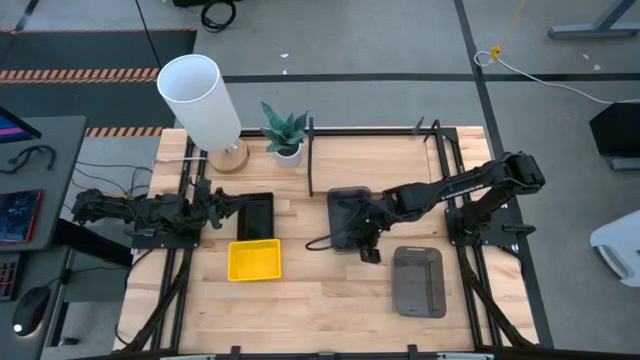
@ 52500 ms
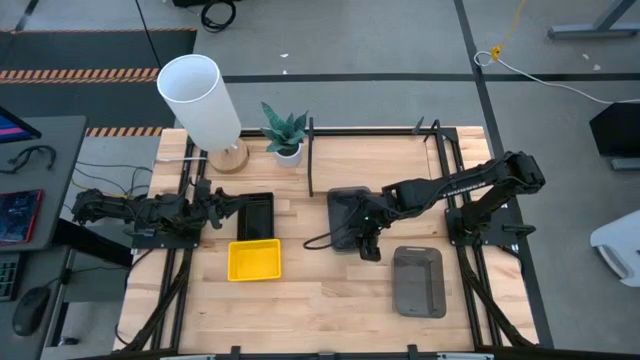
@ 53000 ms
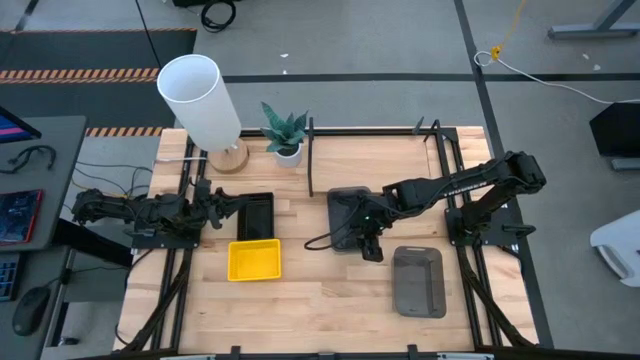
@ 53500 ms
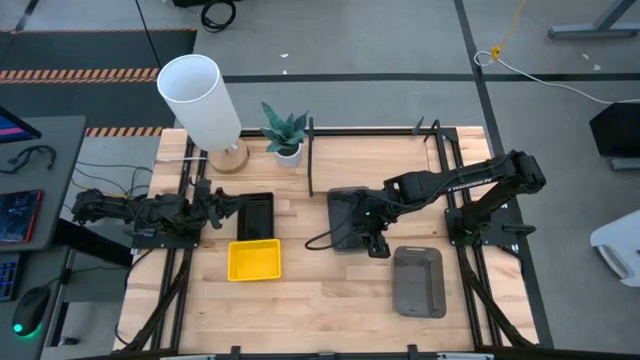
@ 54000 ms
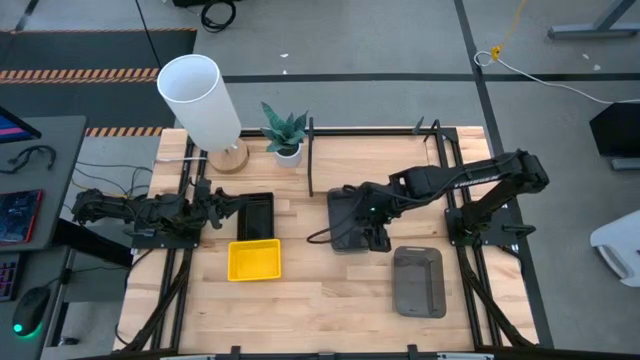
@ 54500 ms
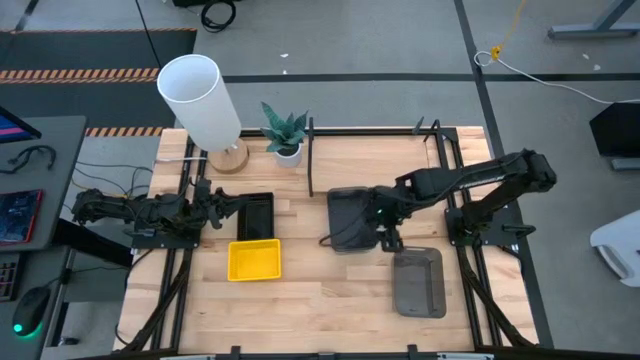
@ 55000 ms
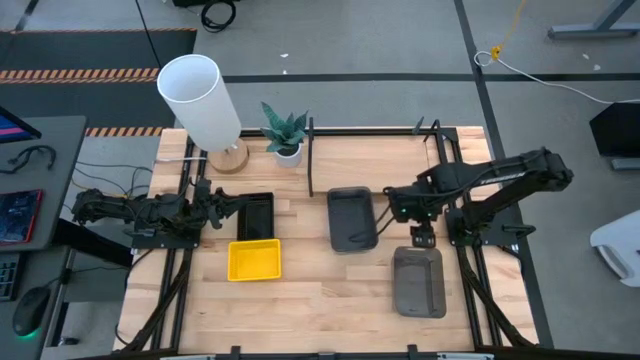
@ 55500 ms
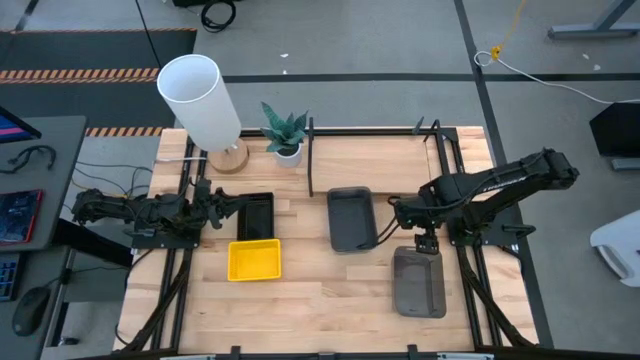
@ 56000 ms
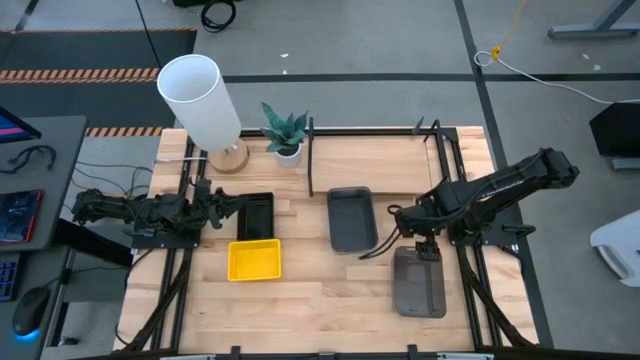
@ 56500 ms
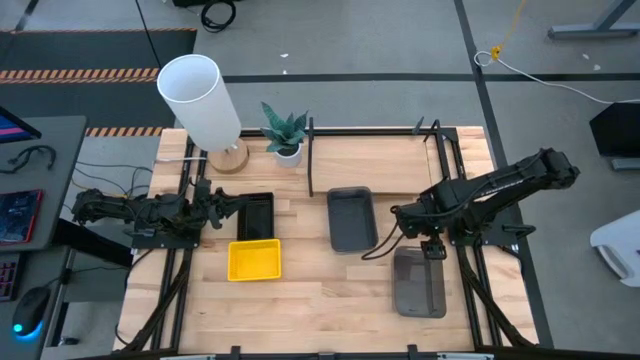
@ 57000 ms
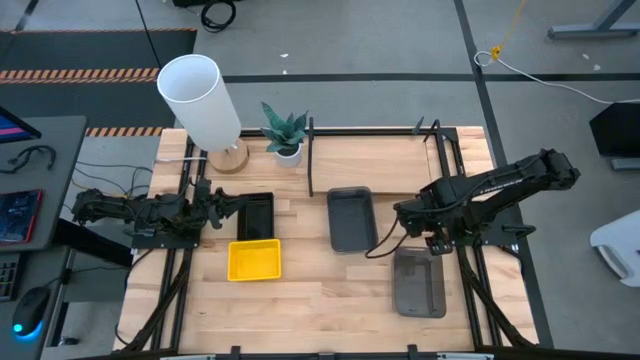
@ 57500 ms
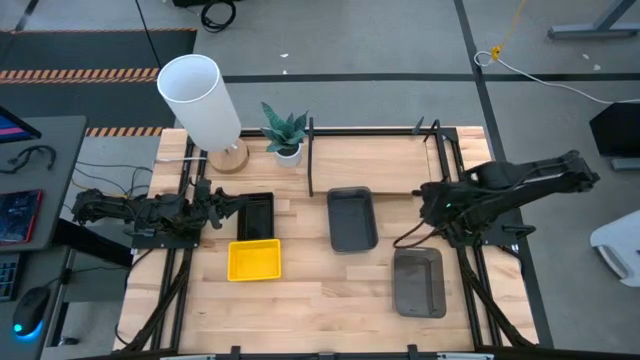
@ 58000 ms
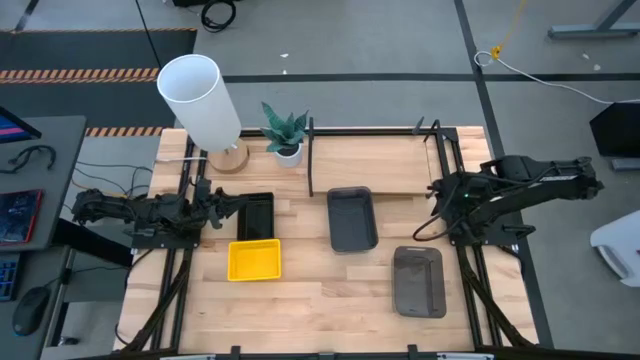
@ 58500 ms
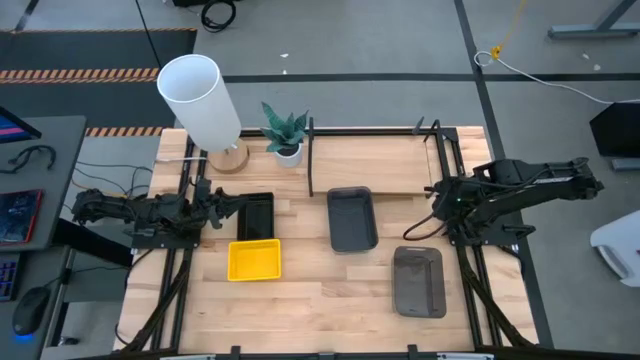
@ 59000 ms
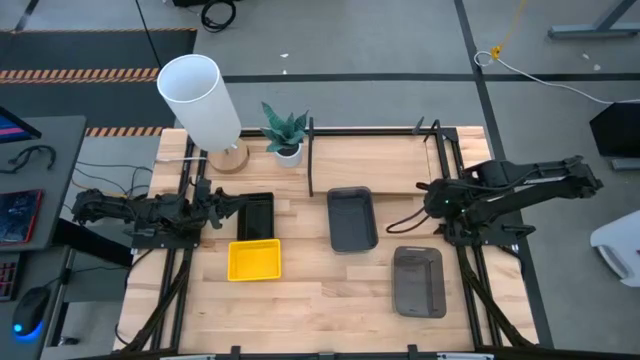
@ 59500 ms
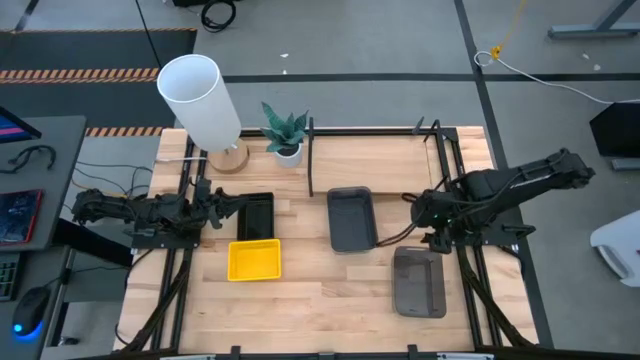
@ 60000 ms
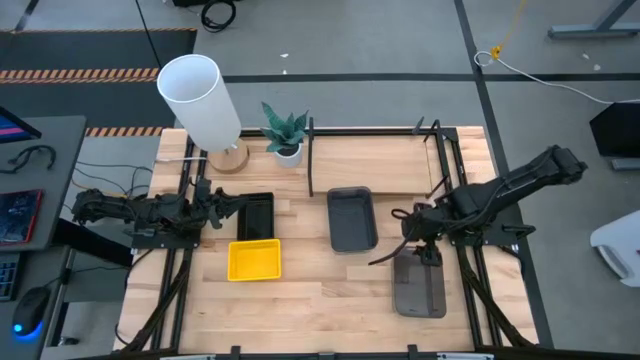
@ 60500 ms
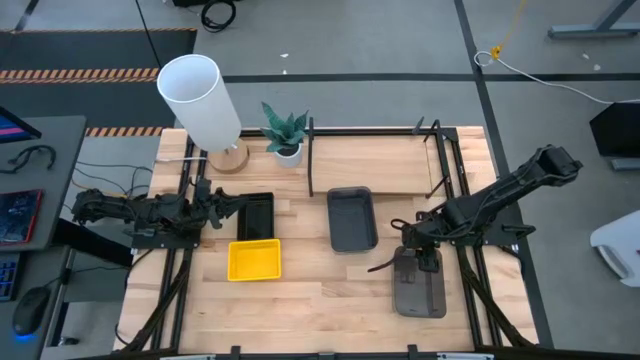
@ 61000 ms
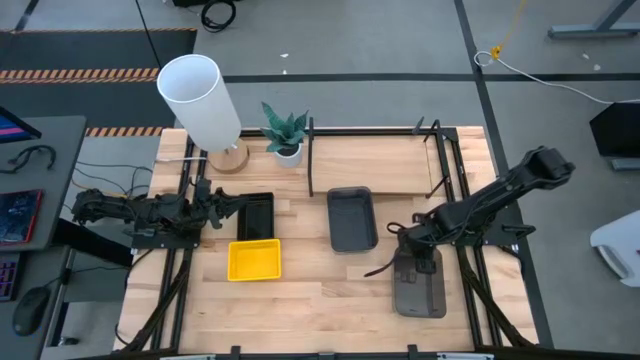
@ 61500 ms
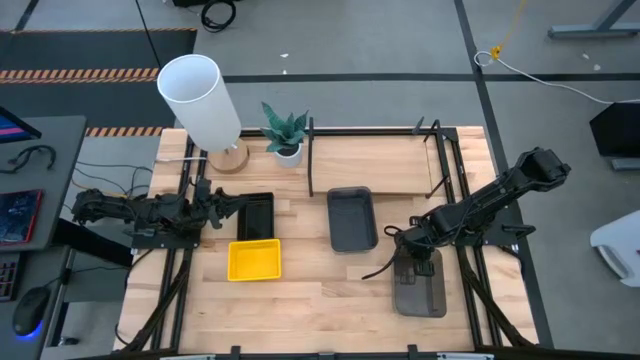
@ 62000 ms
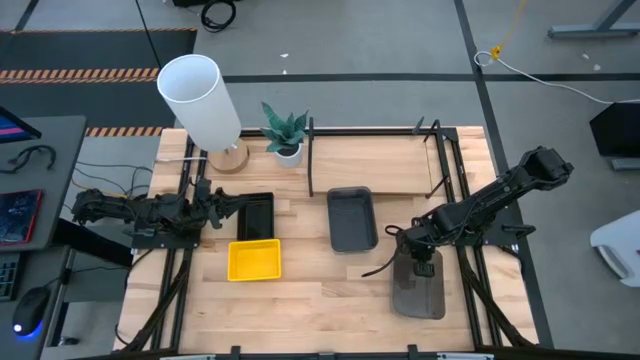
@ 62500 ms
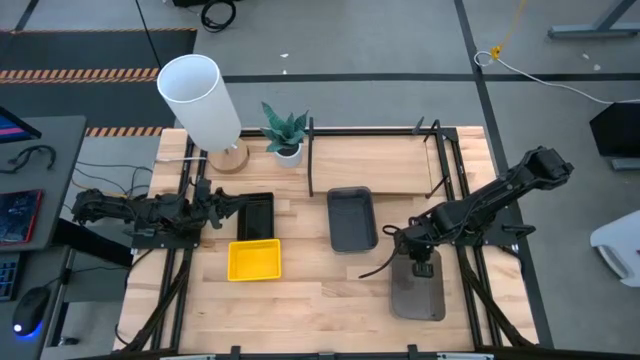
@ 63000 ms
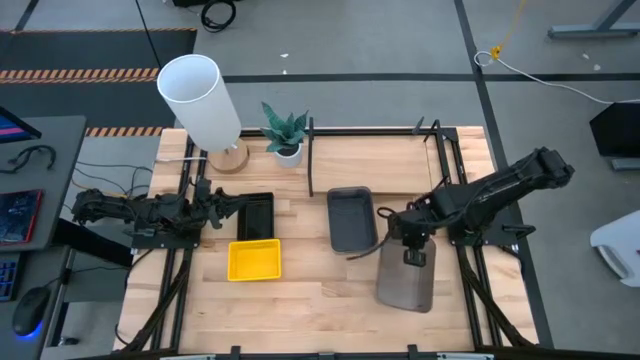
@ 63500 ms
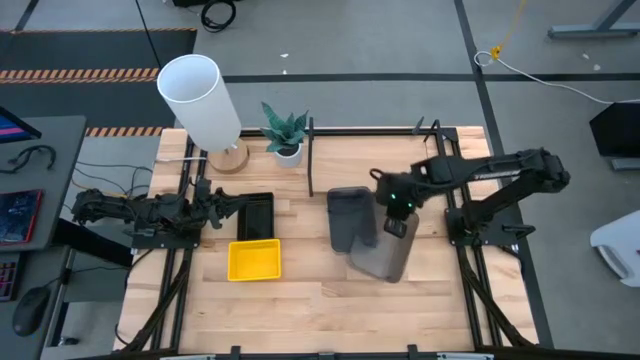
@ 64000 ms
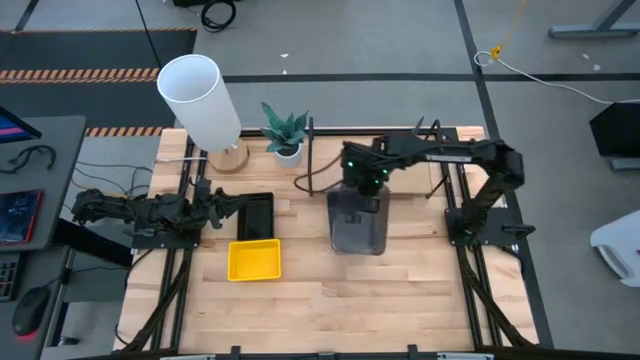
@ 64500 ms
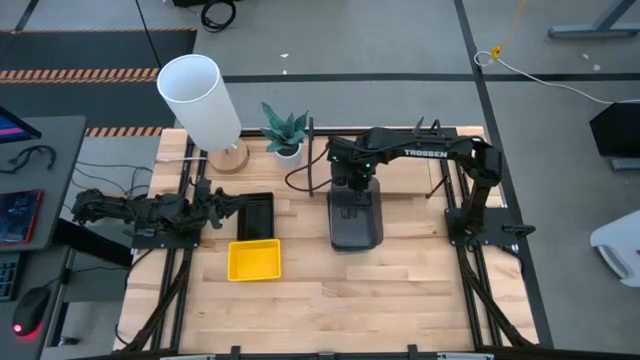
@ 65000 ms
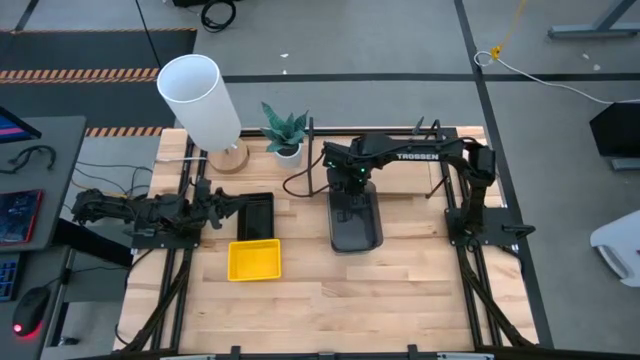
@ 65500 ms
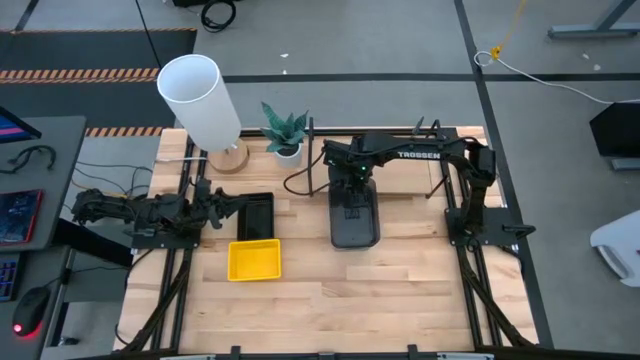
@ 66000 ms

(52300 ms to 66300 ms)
Task: Stack baskets on shelf by color
Stack the bottom gray bin on the stacked gray bins

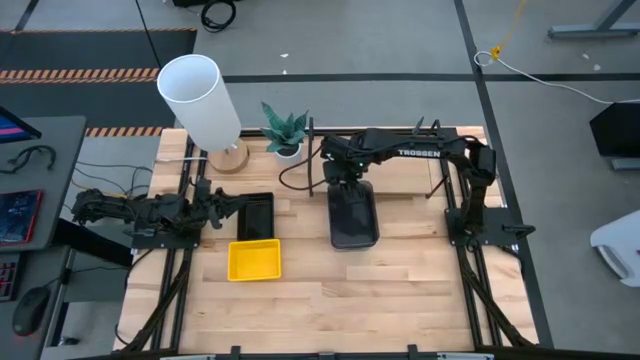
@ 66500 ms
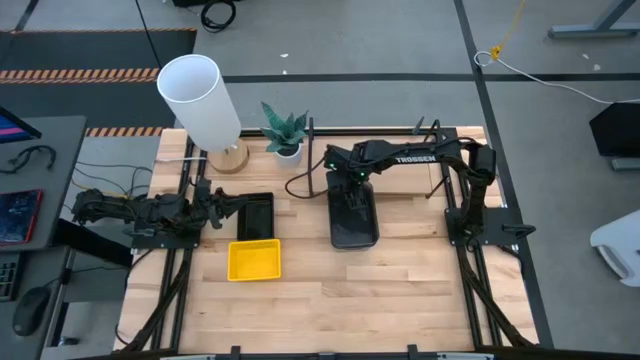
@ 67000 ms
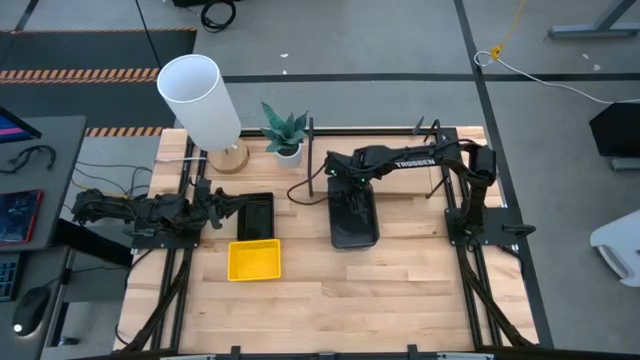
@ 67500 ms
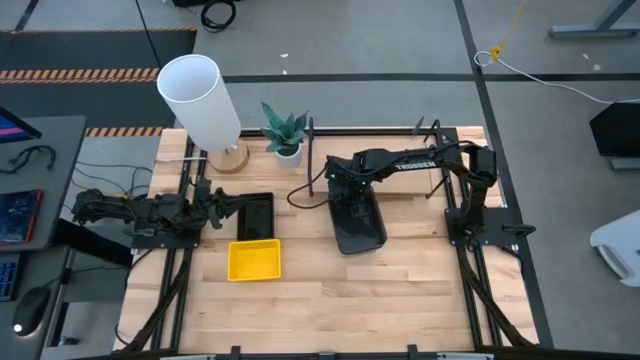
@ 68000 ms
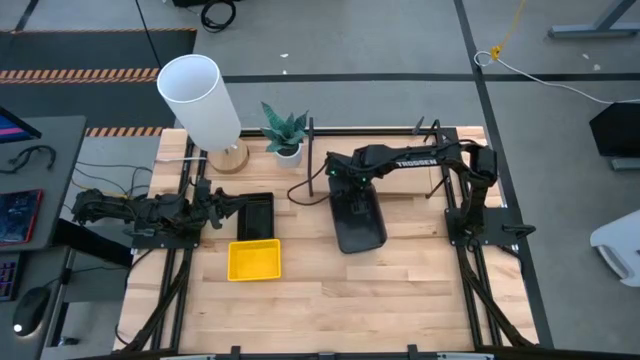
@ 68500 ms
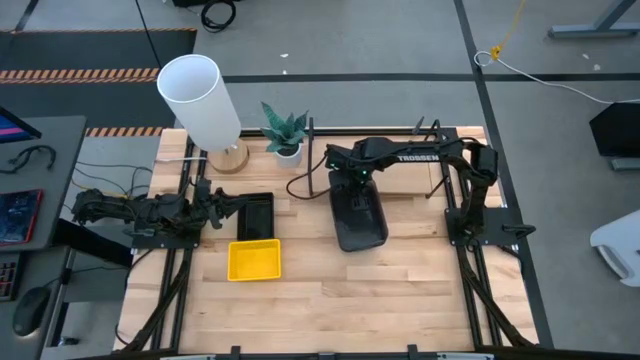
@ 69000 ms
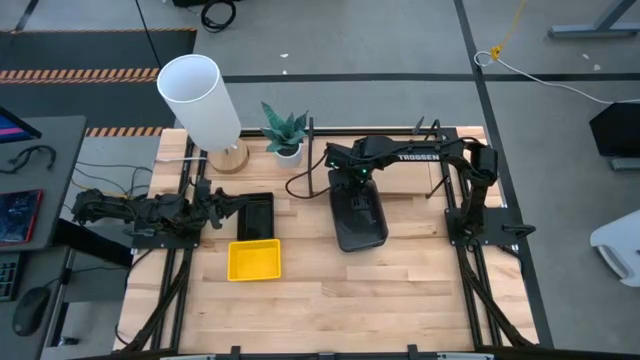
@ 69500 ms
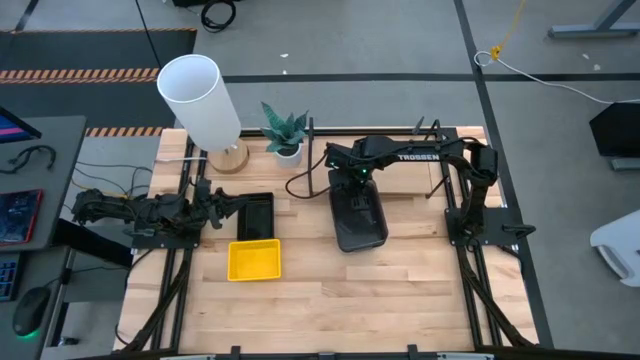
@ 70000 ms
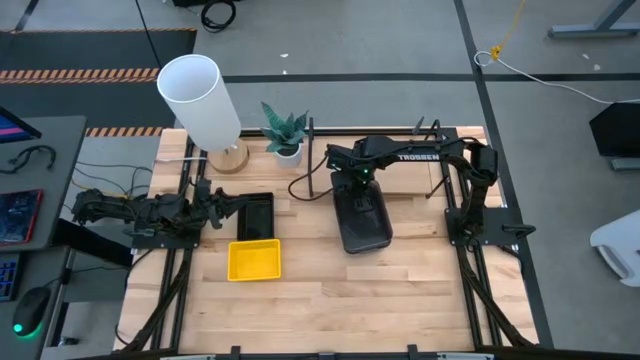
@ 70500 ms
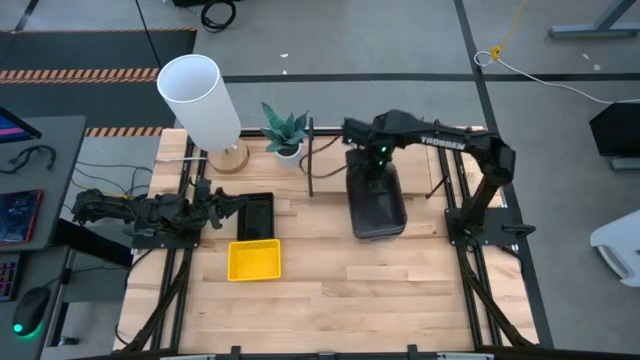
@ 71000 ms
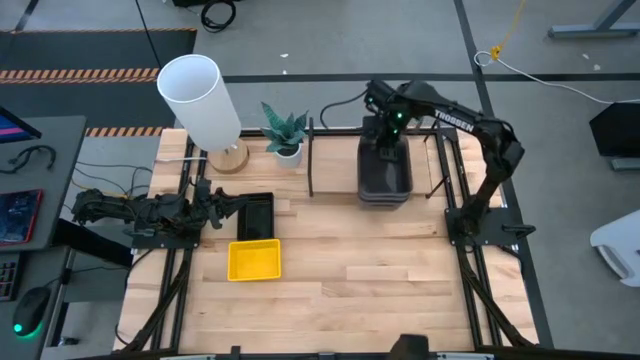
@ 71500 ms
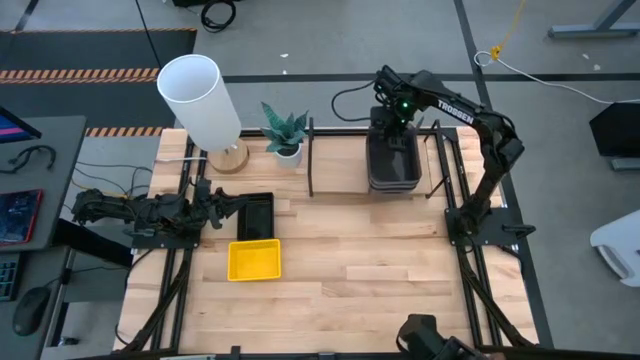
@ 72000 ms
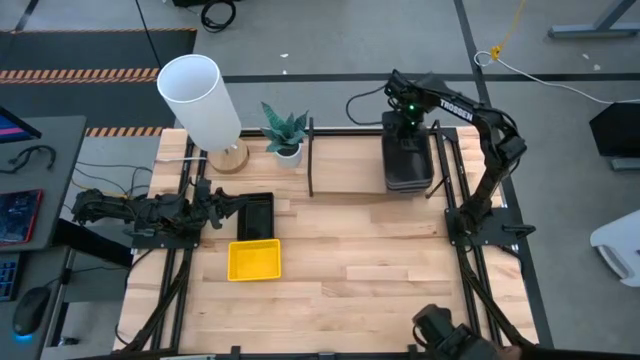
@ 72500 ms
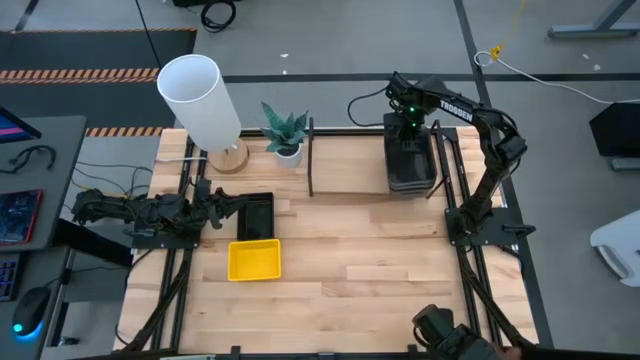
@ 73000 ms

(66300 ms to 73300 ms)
Put the stacked gray bins on the shelf
